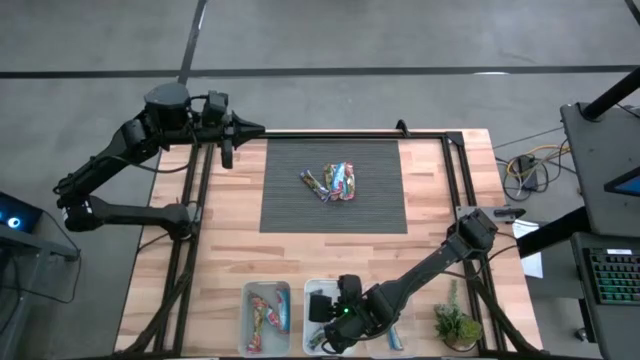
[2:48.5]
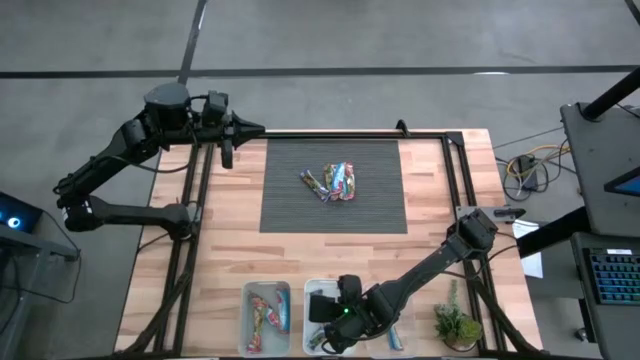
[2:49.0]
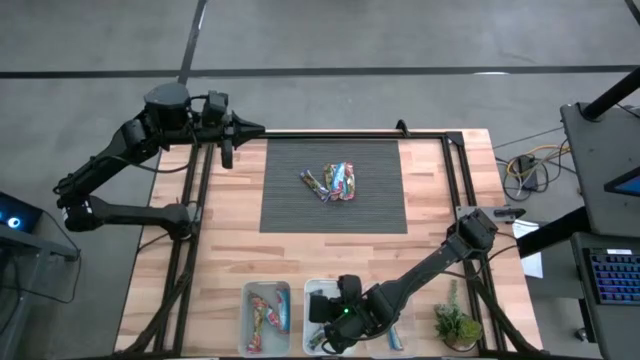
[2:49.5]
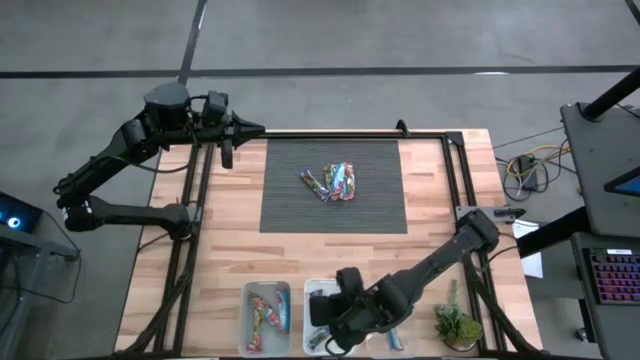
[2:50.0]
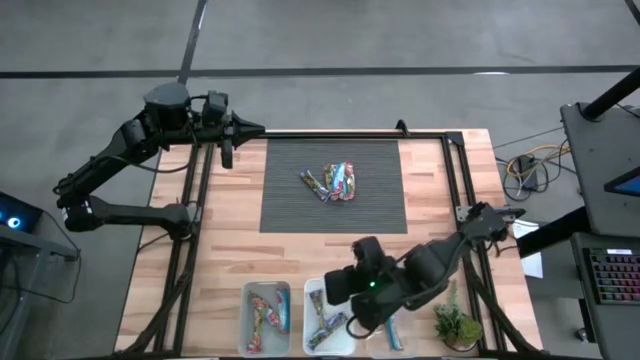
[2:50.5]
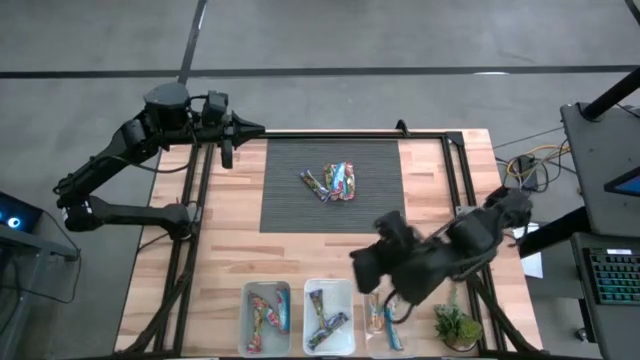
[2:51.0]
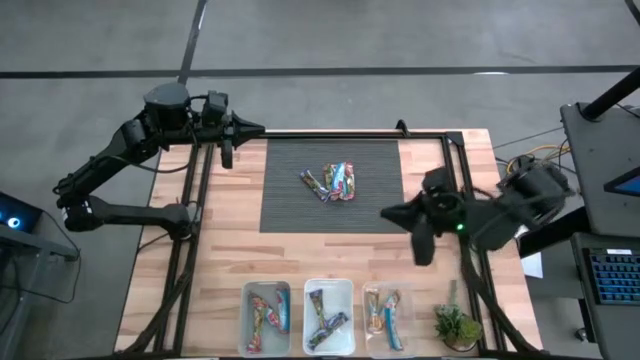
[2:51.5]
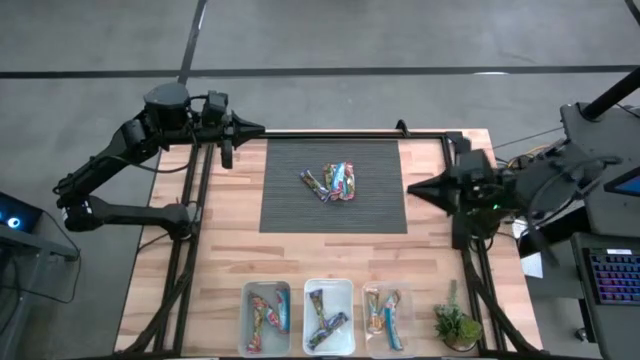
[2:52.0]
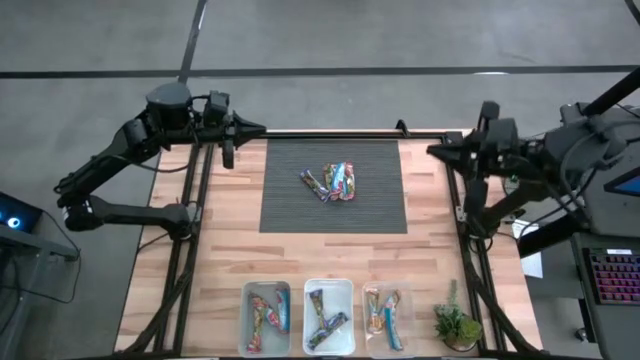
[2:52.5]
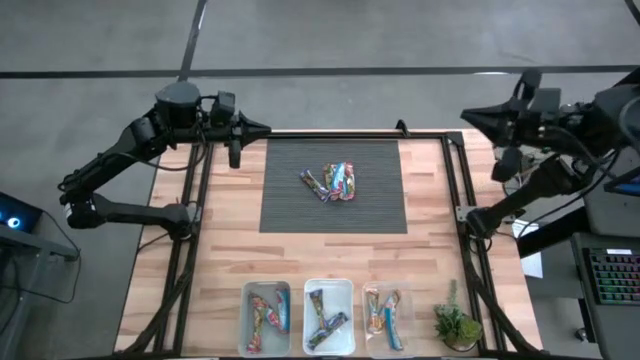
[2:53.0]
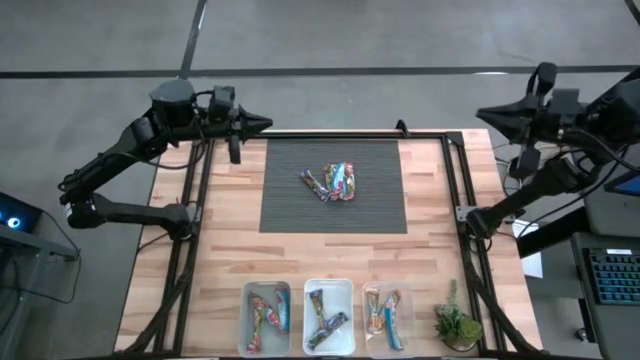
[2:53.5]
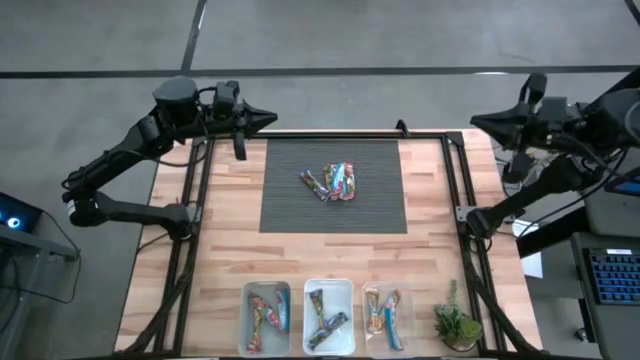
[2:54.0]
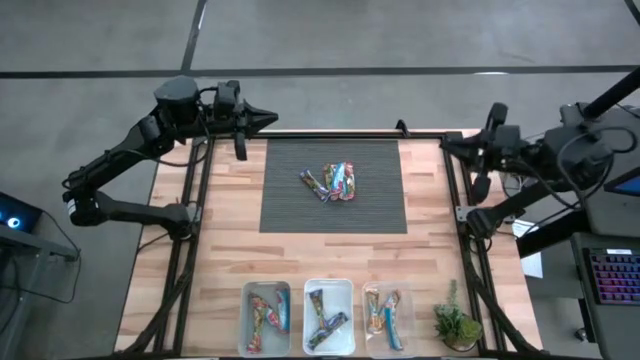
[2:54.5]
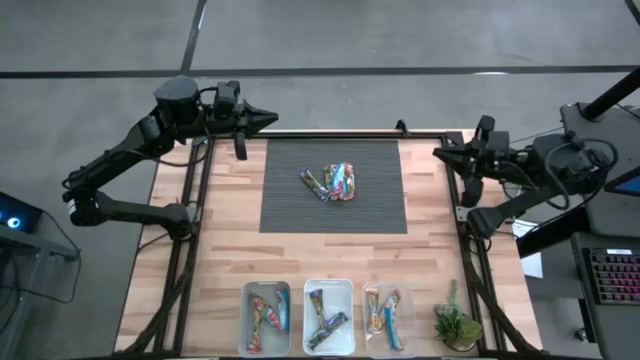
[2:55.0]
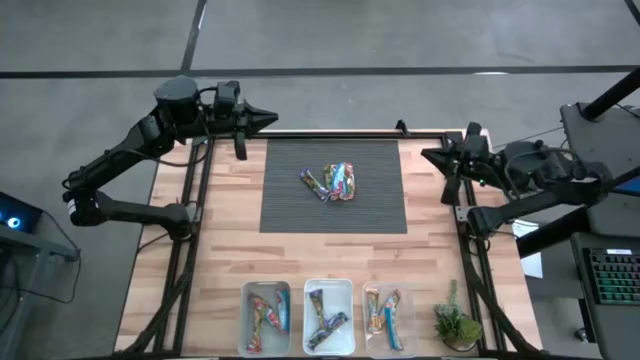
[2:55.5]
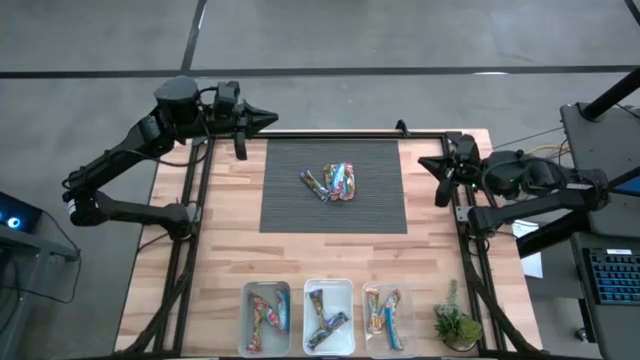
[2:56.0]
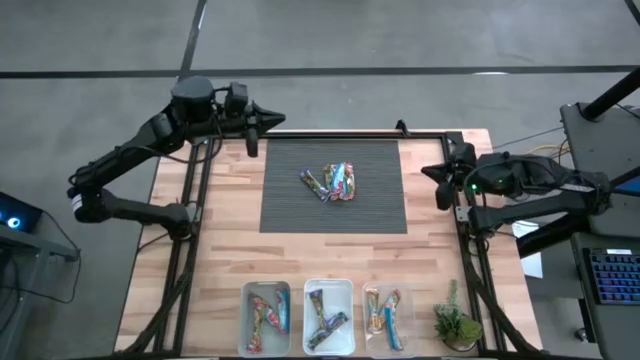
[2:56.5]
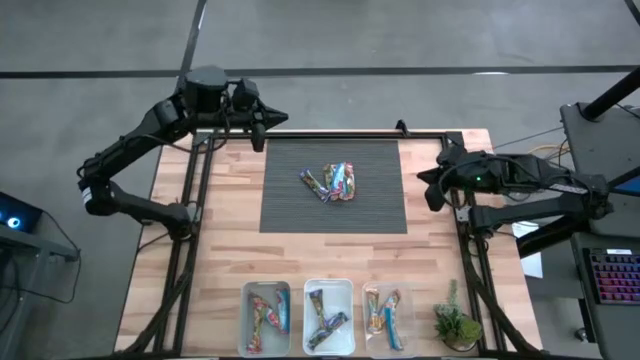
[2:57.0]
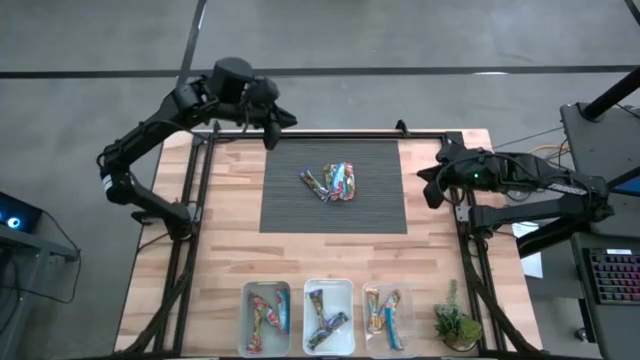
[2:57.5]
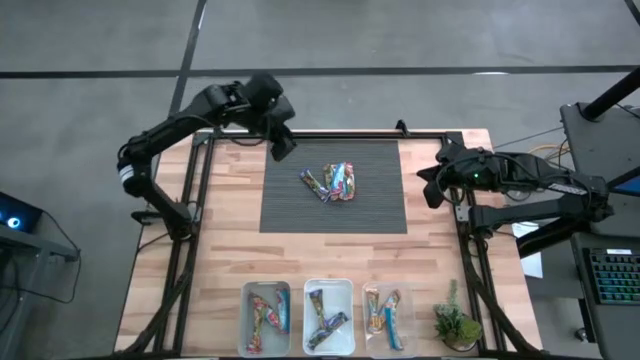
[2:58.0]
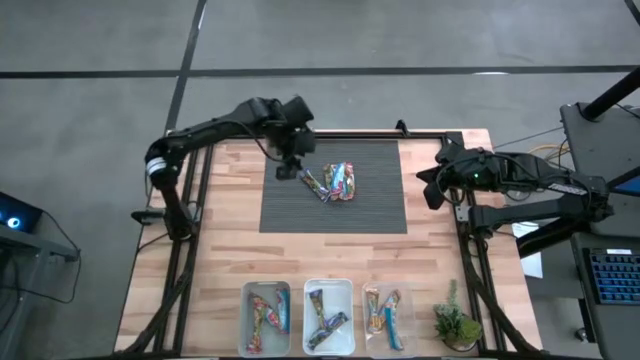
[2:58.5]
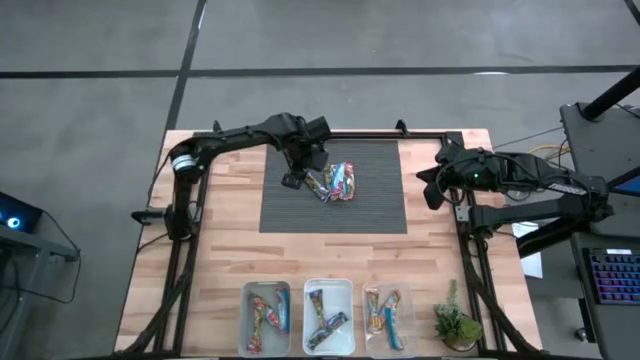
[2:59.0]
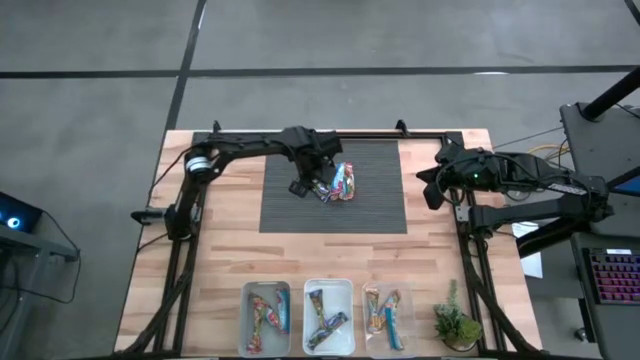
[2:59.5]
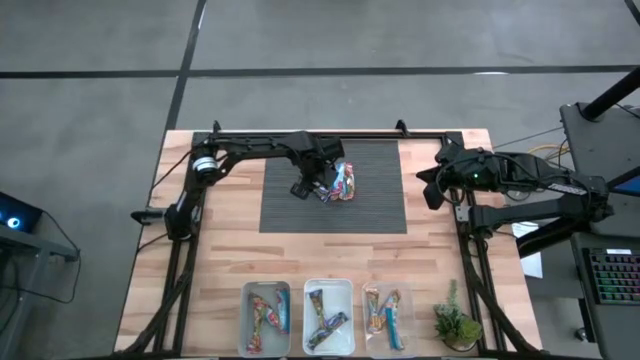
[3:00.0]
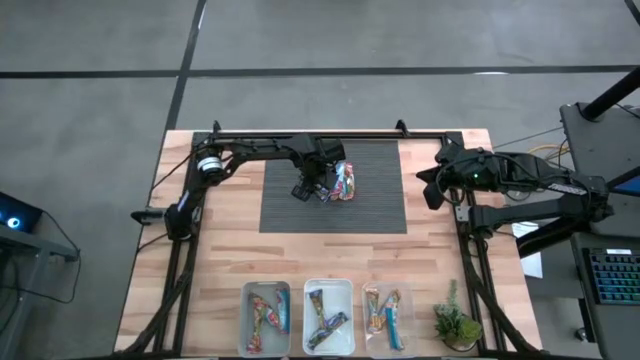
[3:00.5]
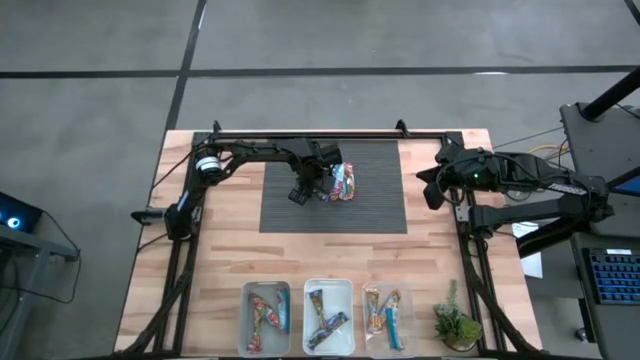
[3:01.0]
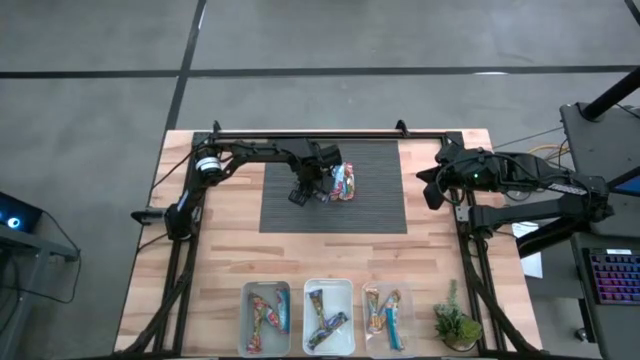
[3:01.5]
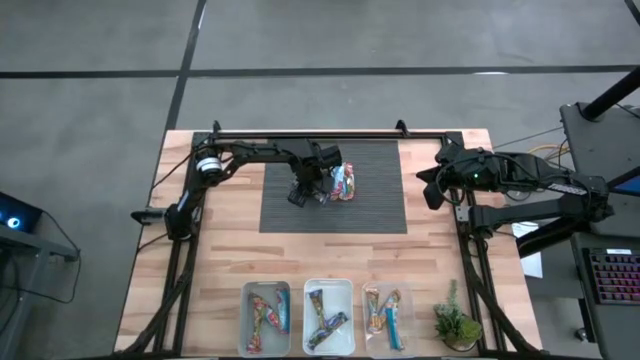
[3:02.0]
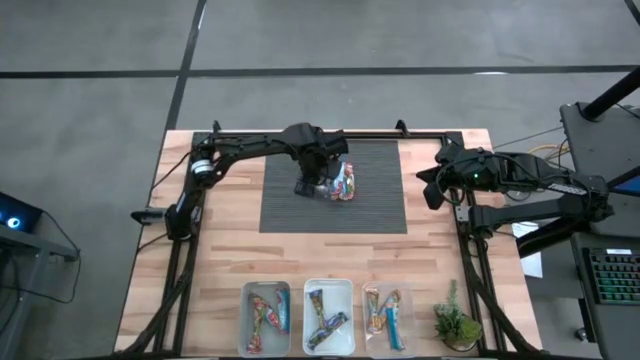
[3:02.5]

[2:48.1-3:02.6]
Task: Pick and place Granola Bars by type
Put the blue granola bar into the white bin

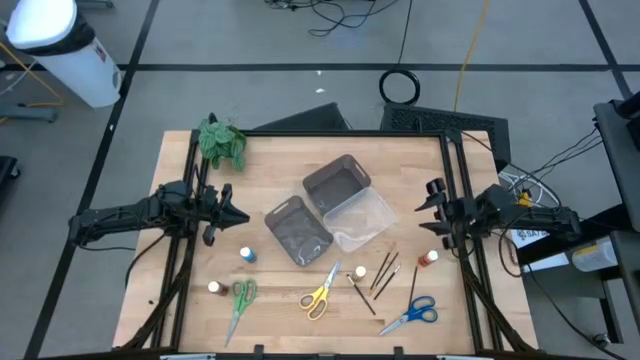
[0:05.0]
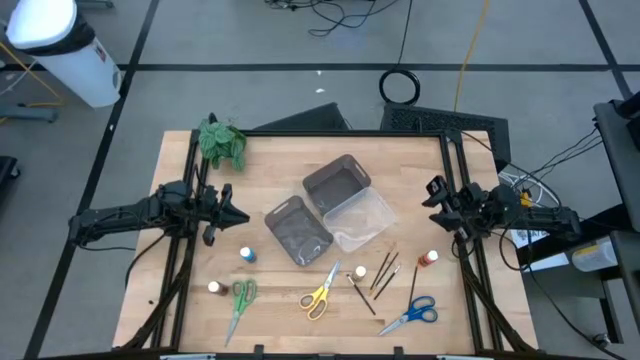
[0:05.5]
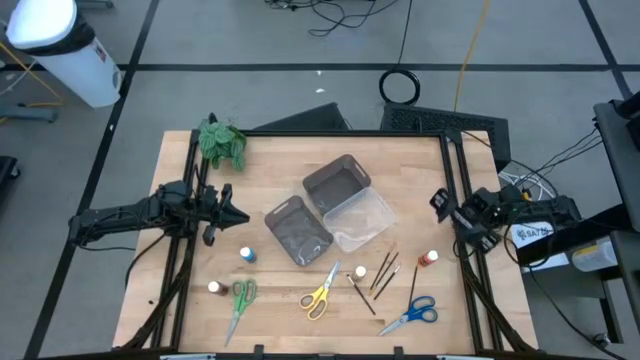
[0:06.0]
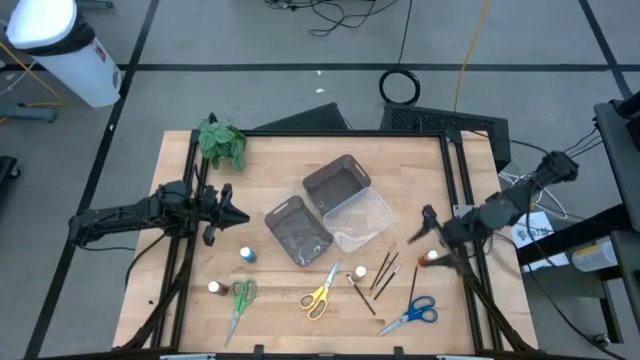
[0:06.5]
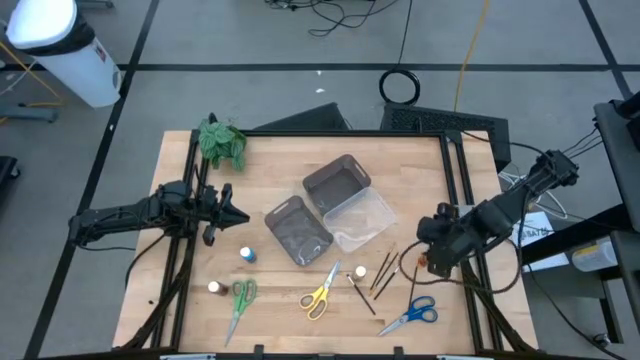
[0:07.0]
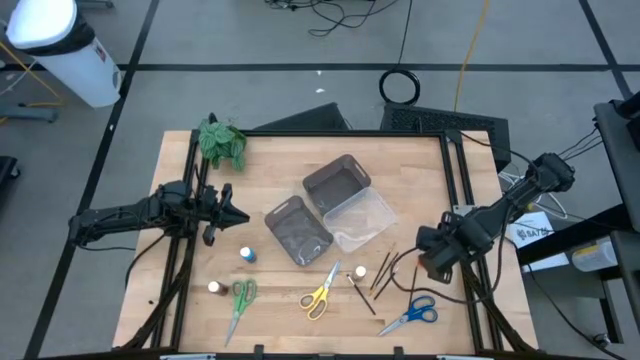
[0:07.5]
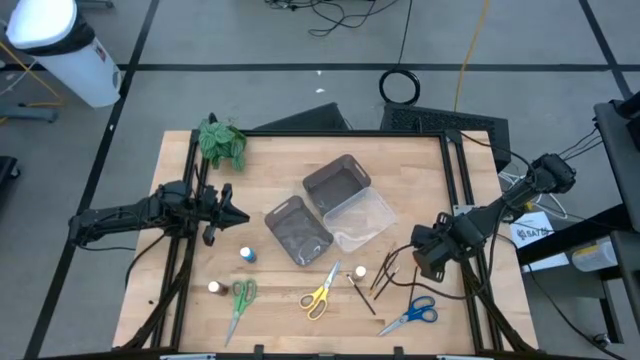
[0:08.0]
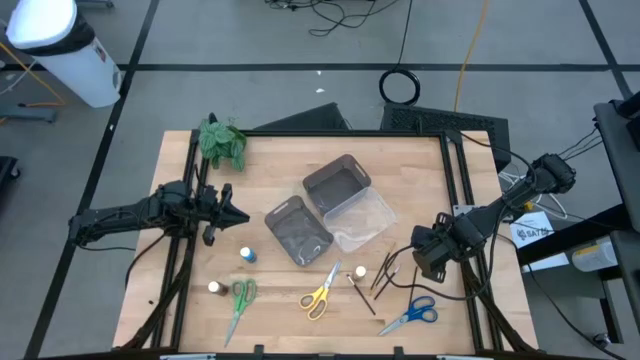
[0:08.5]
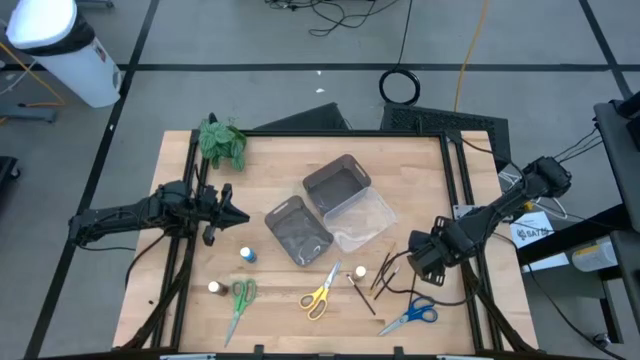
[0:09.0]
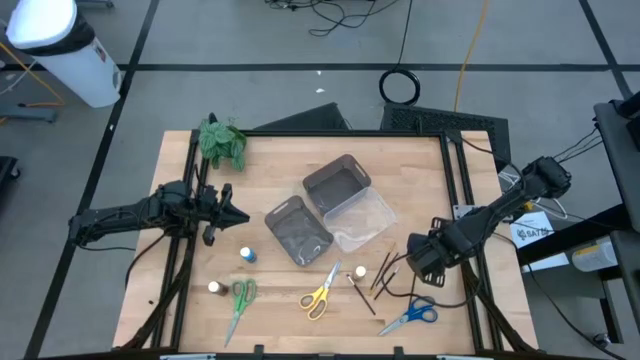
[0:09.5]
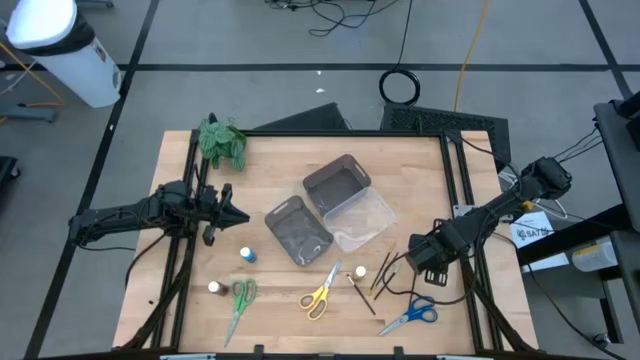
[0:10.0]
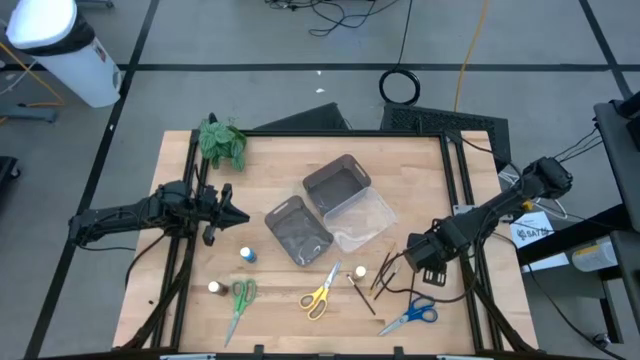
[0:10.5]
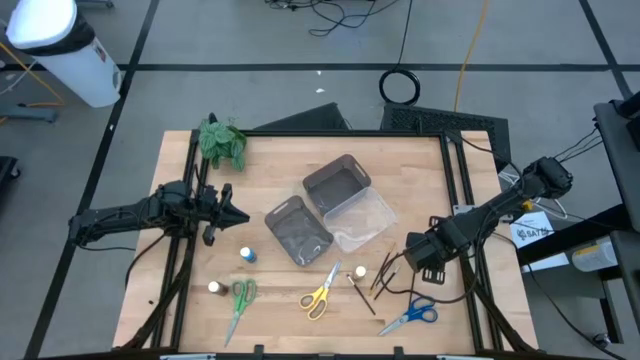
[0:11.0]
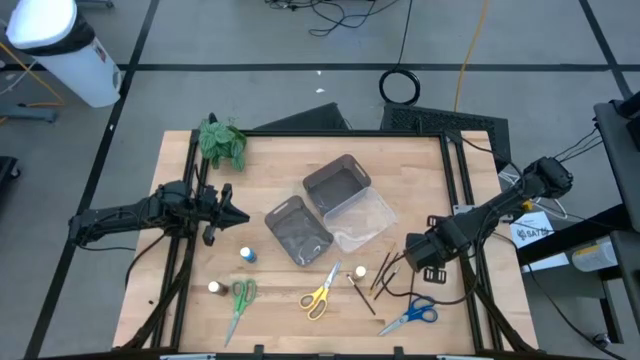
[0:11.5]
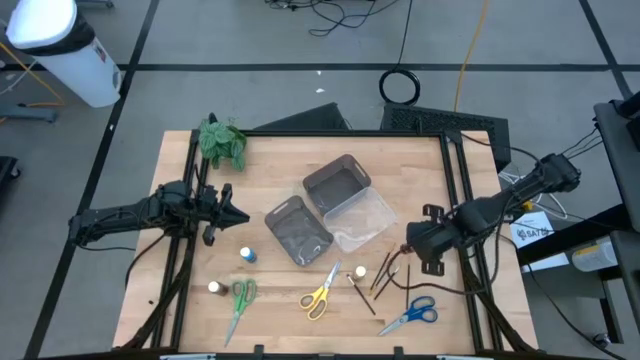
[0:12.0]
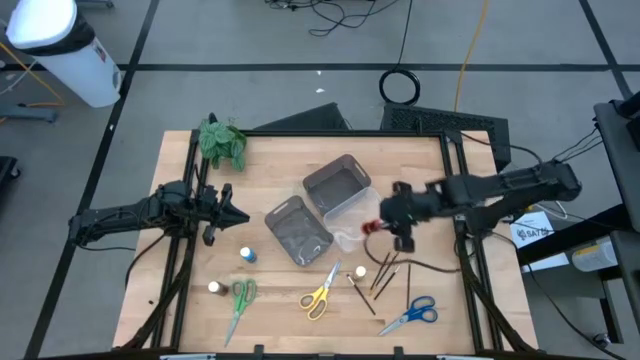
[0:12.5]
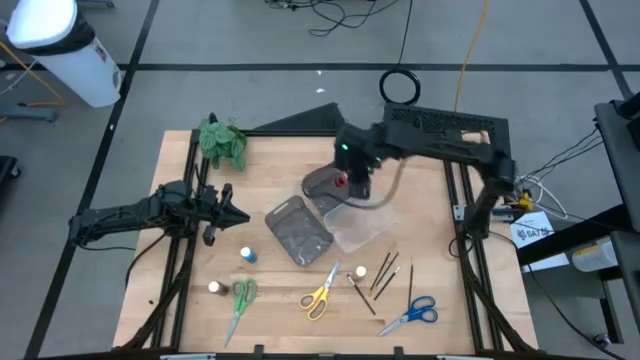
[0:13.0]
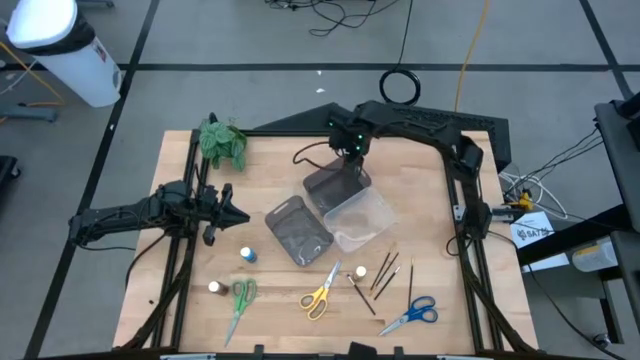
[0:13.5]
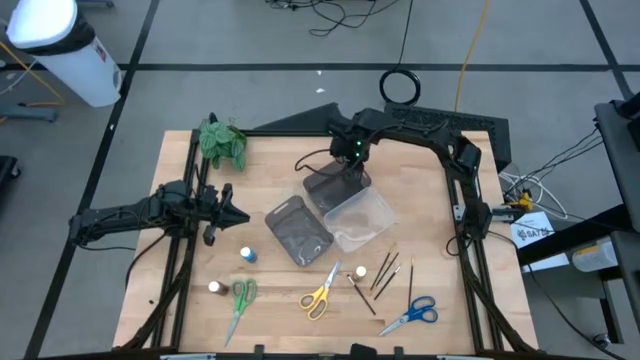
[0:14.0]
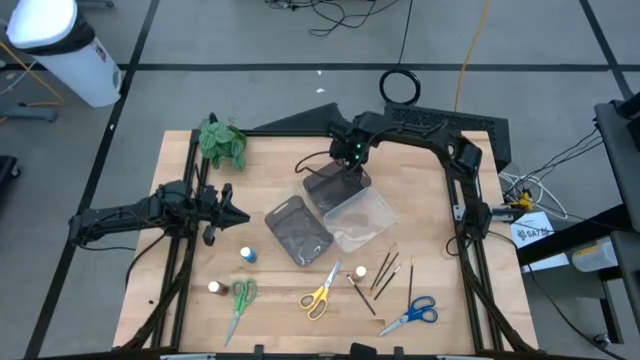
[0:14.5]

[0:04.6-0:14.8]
Task: Pick & Place Paint Supplies
Put the orange paint bottle into the top black bin
